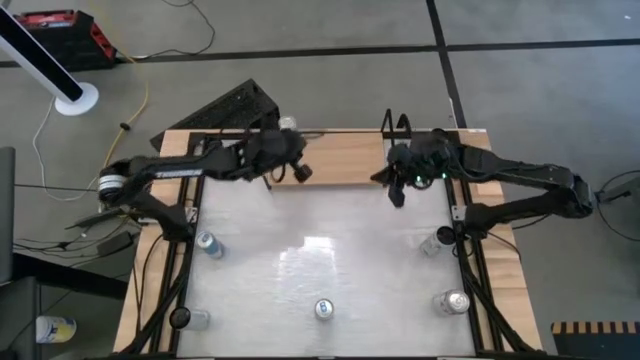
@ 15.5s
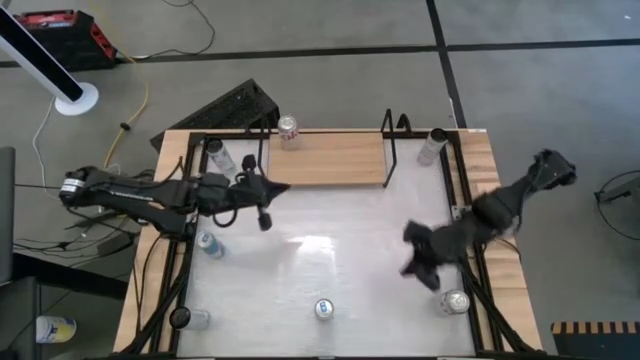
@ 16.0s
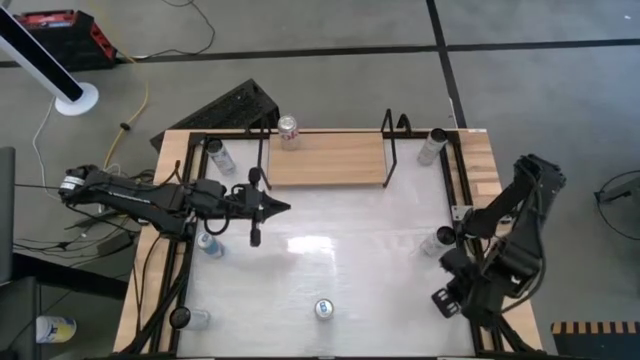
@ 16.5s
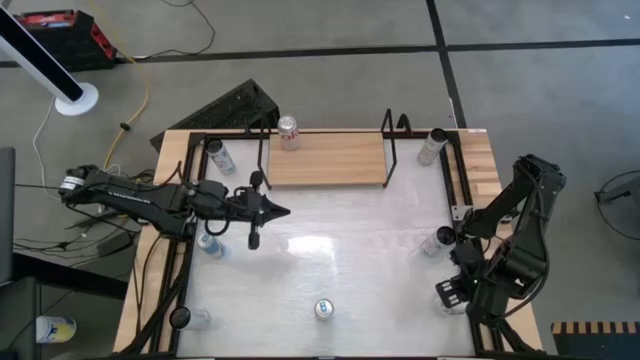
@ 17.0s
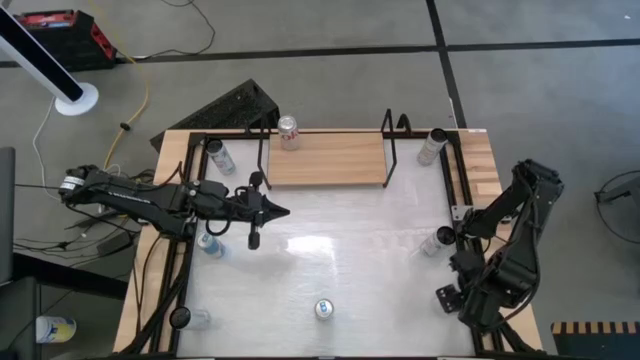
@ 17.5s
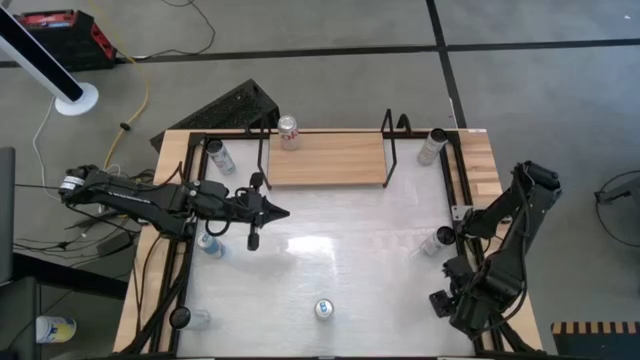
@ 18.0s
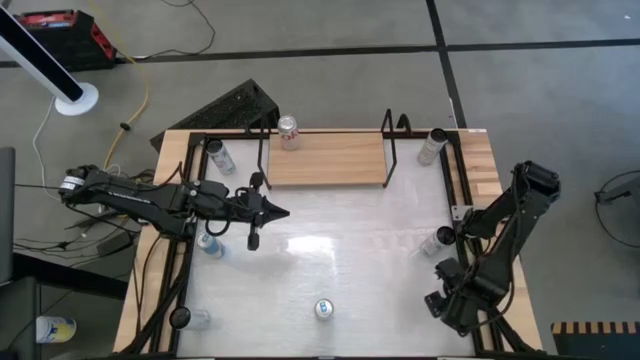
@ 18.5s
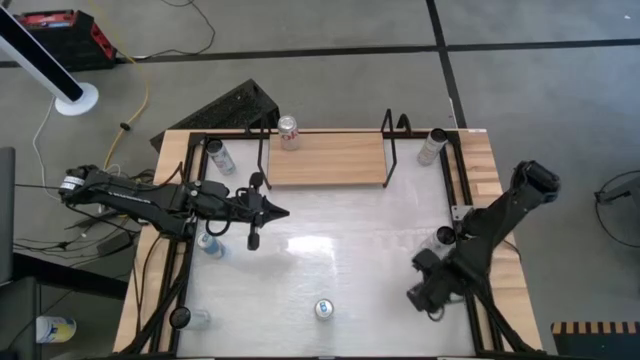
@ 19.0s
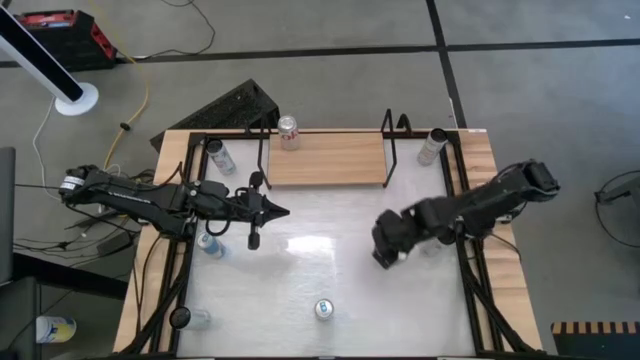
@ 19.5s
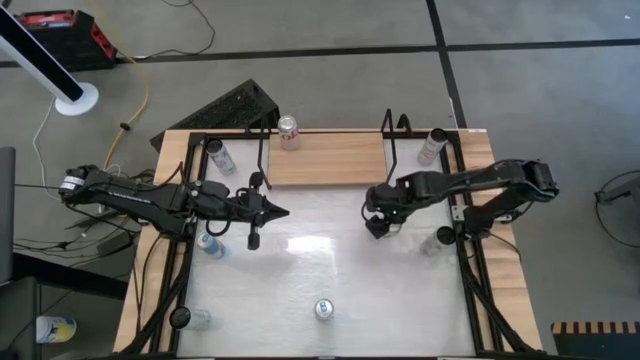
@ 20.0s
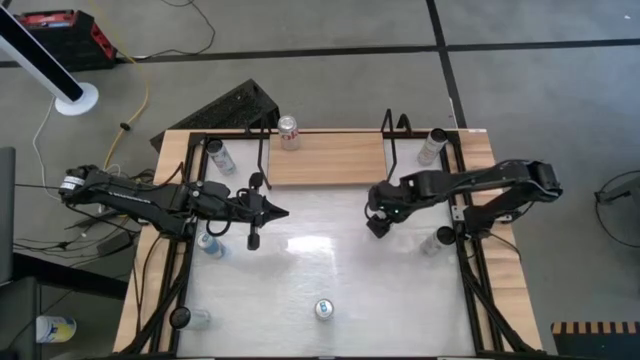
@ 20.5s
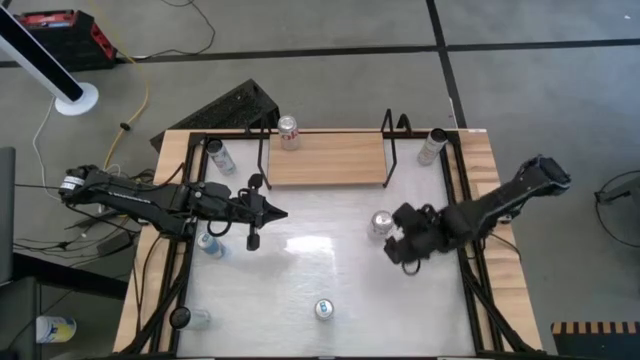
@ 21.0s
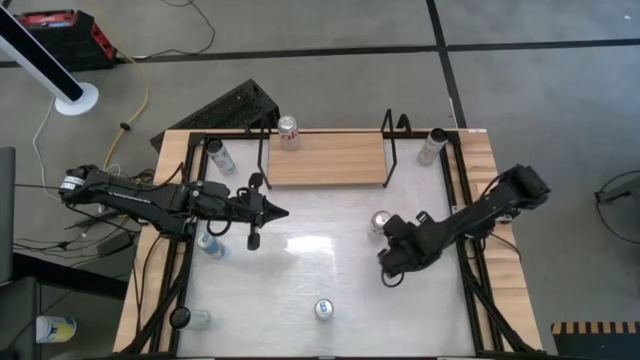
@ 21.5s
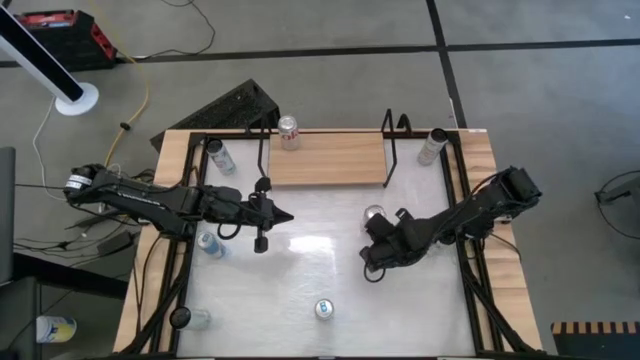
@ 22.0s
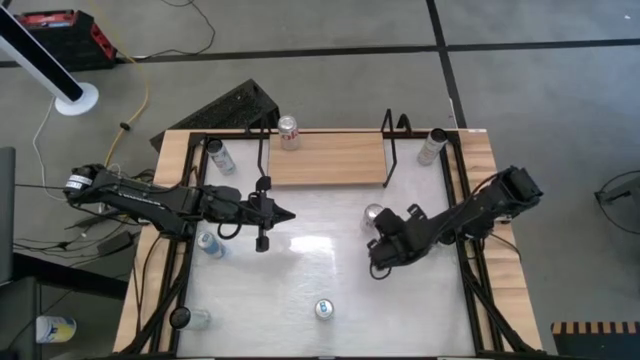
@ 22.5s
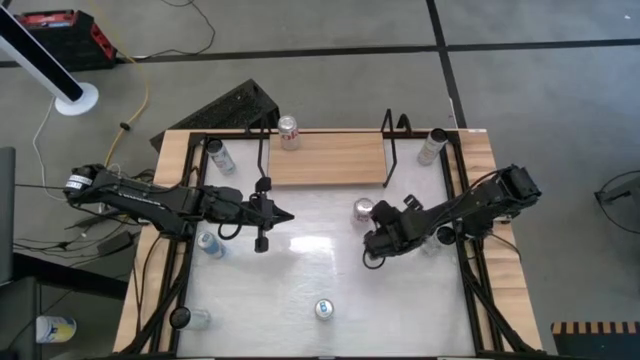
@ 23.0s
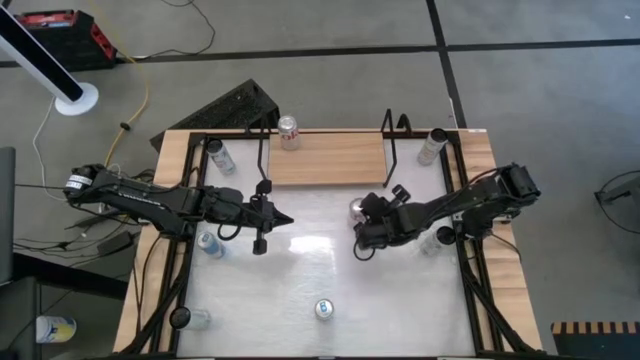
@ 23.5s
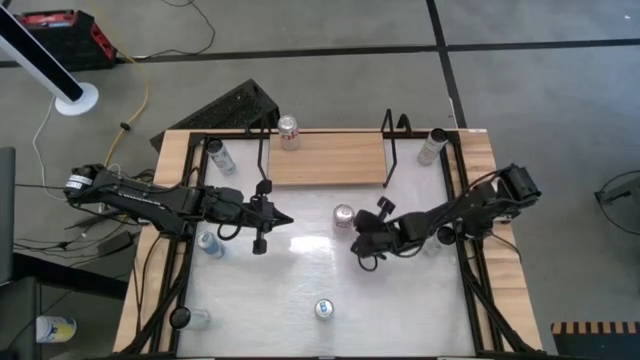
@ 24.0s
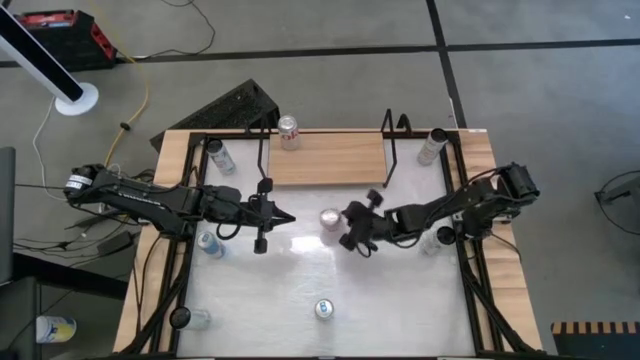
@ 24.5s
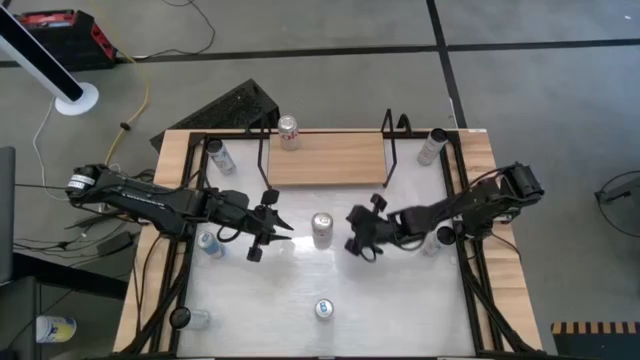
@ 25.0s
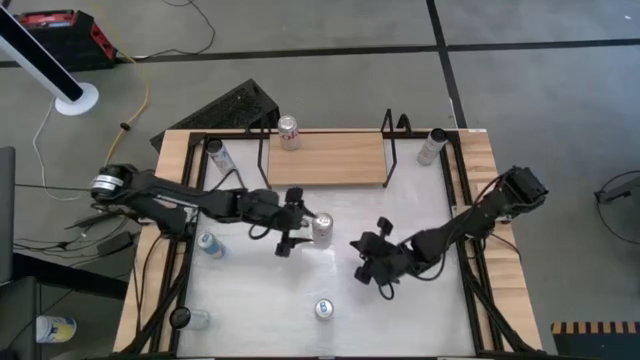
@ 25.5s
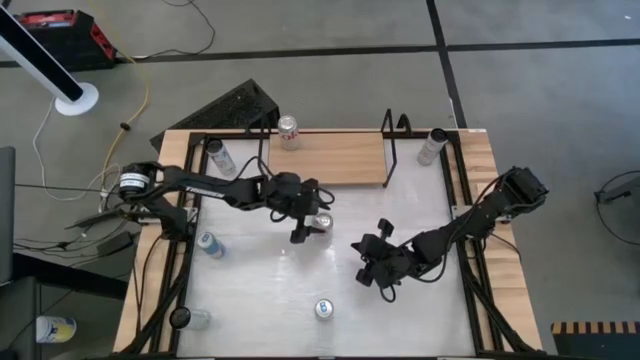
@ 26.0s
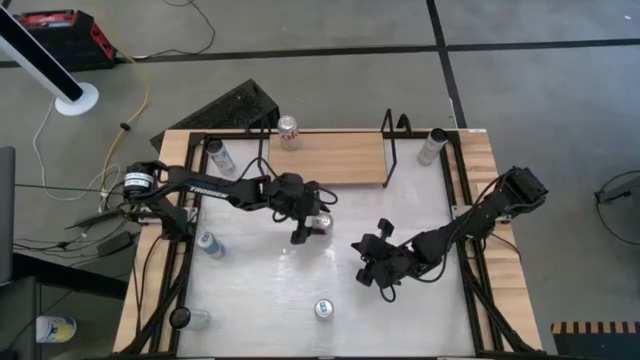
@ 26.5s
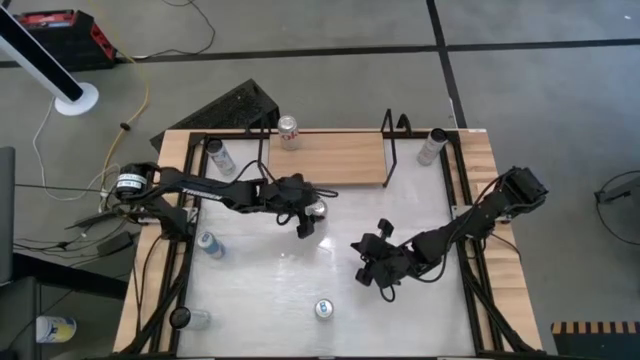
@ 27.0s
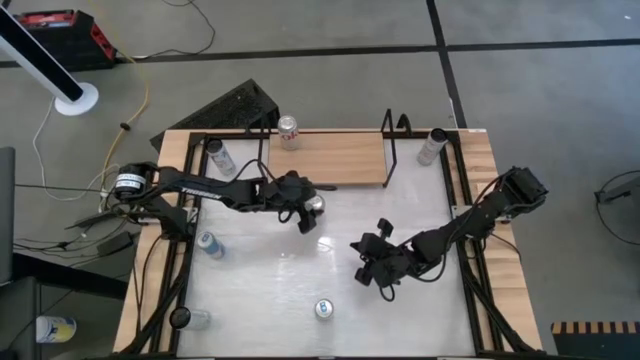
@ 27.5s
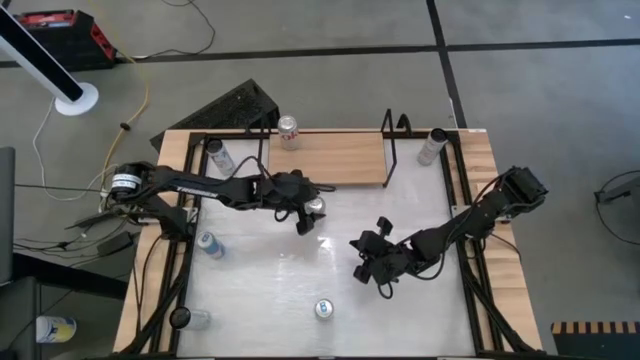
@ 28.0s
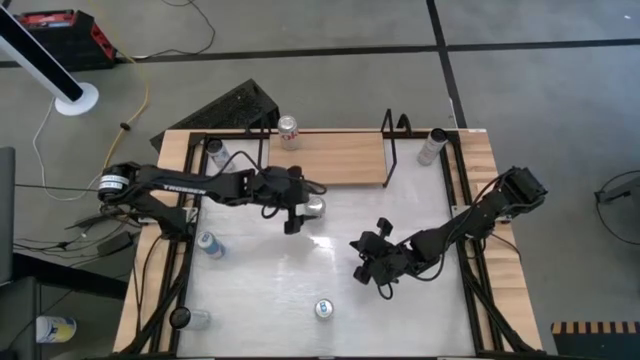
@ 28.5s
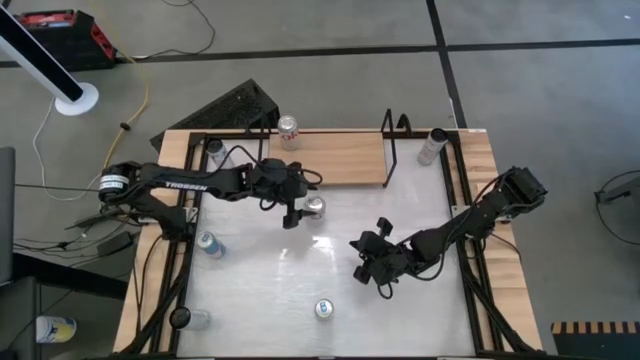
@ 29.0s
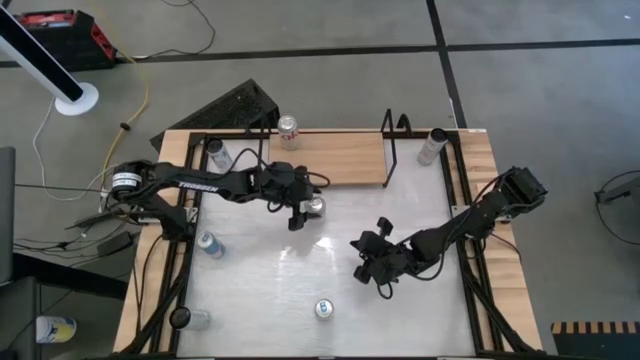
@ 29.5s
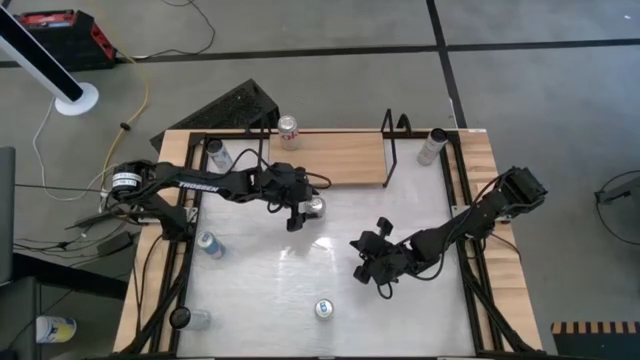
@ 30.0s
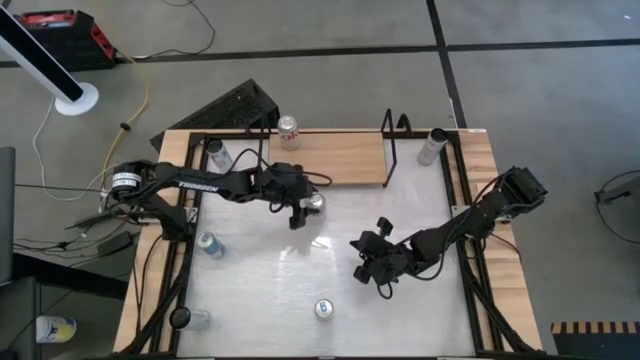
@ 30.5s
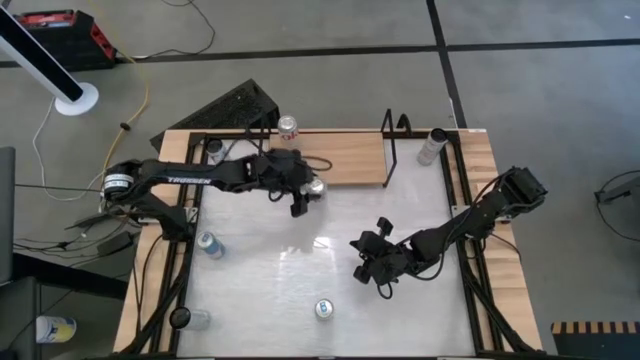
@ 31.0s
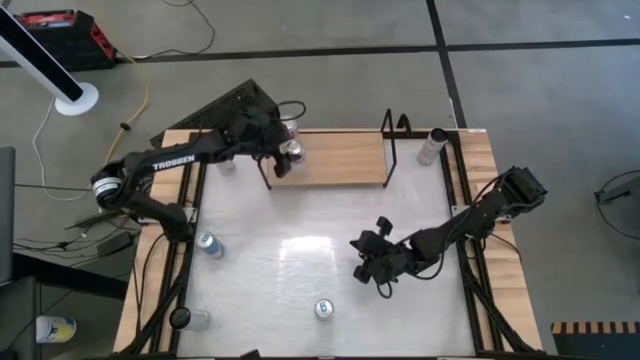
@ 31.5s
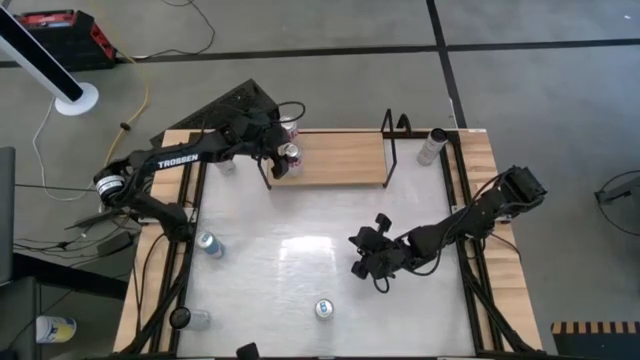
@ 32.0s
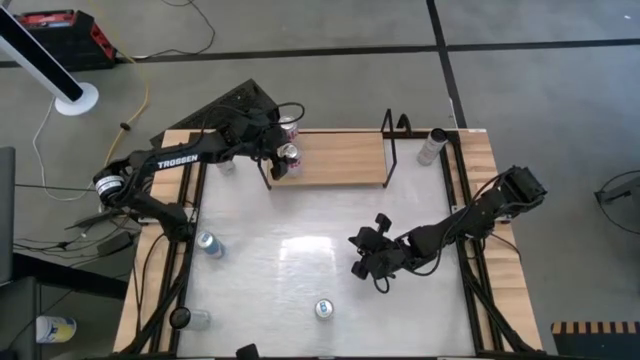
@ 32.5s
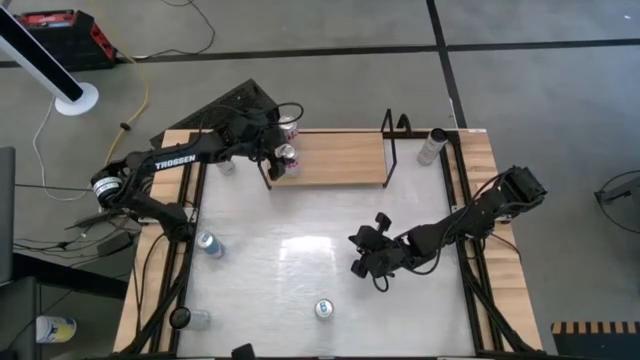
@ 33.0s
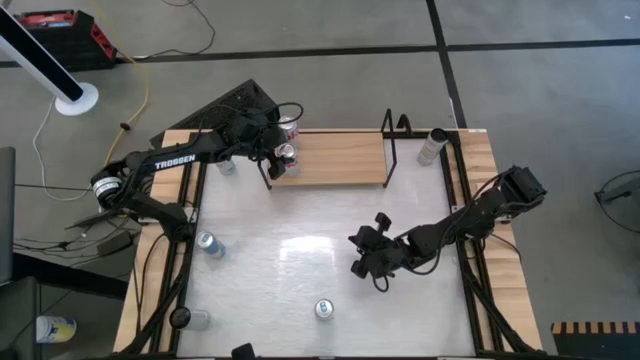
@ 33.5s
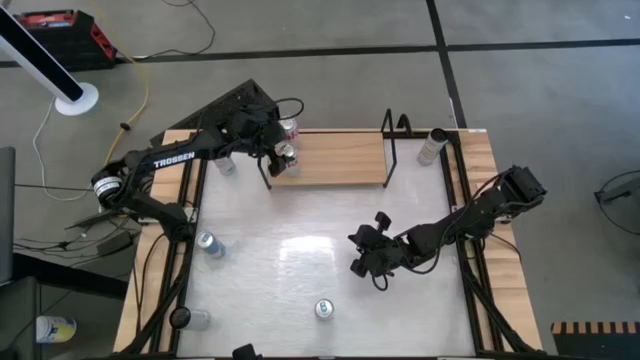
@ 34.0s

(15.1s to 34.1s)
Task: Place canned beverage on shelf
Put the silver soda can on the shelf aligned with the other silver soda can

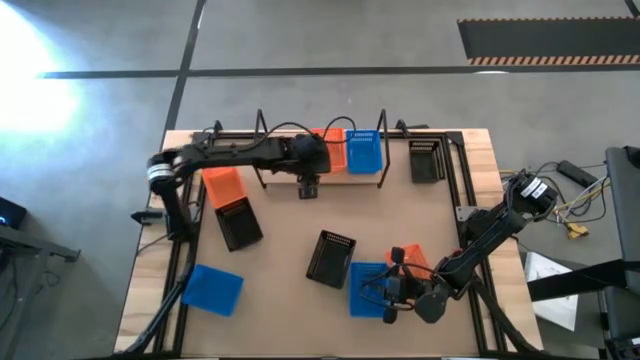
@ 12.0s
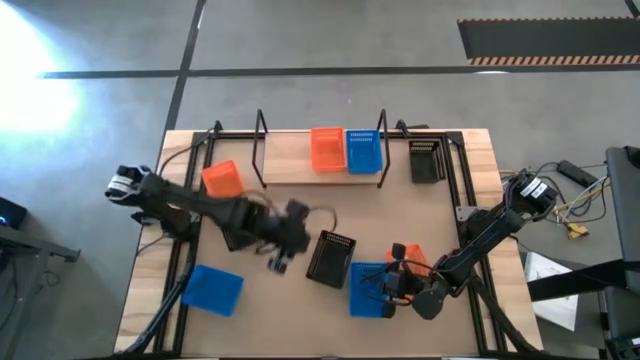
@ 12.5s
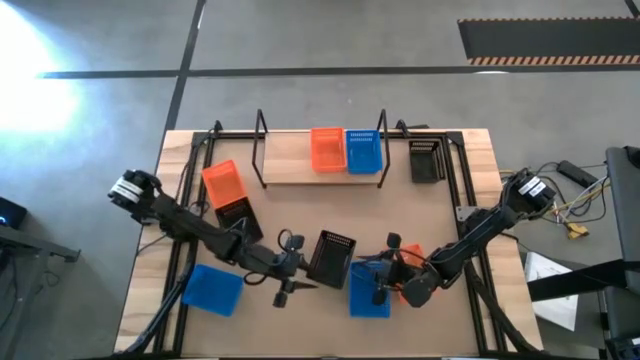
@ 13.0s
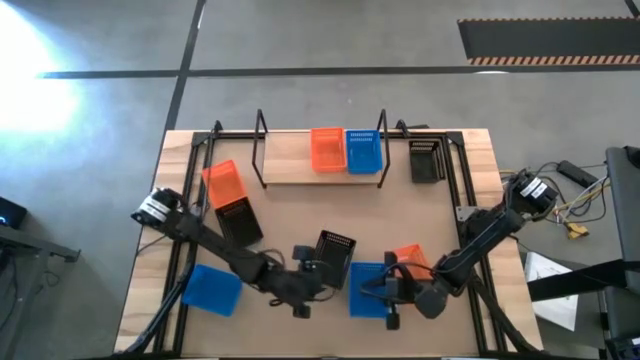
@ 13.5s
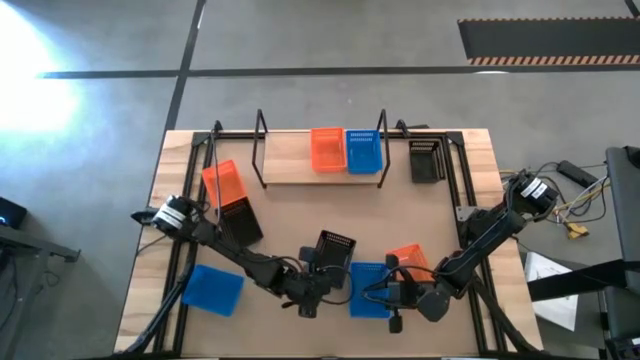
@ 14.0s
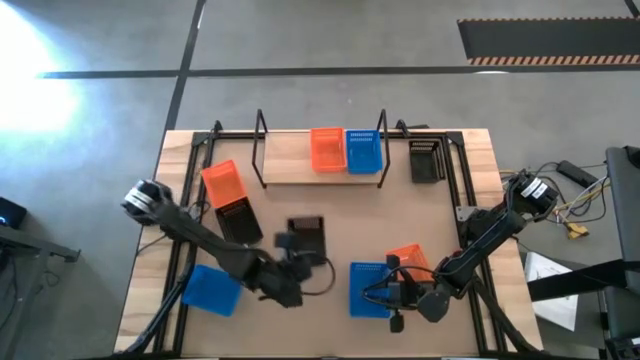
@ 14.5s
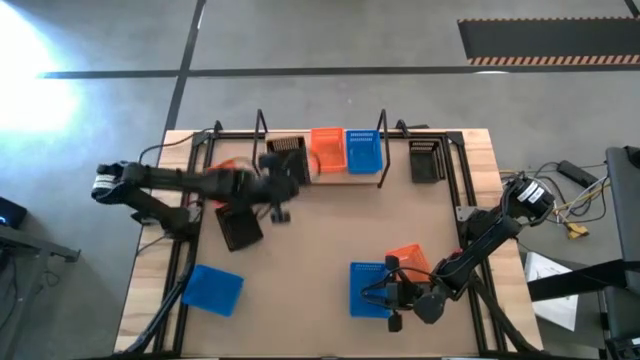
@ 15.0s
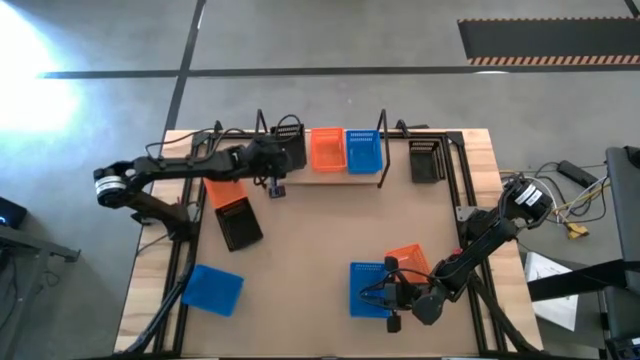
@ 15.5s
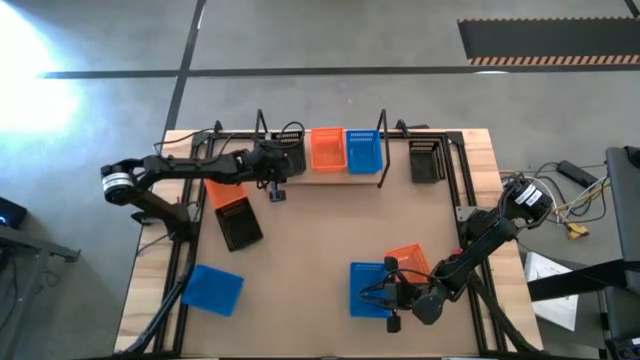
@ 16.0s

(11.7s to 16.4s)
Task: Stack baskets on shelf by color
Put the bottom black bin on the shelf
